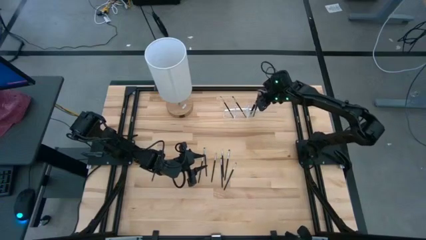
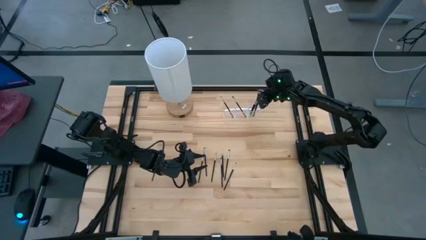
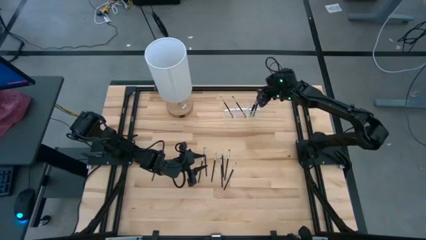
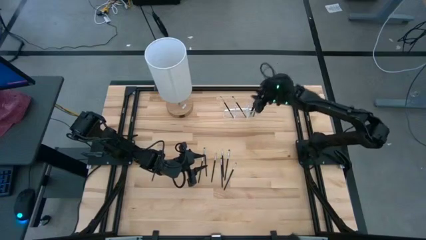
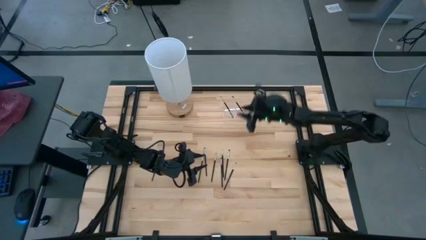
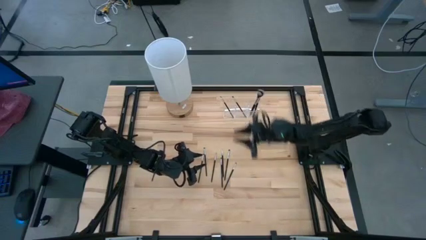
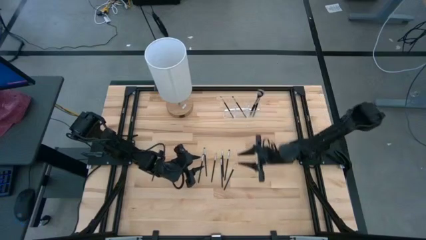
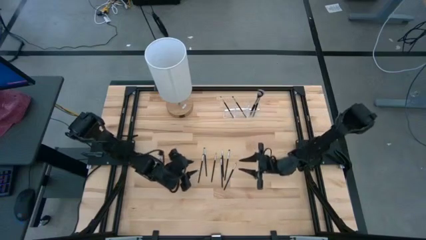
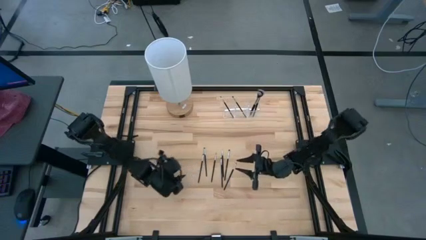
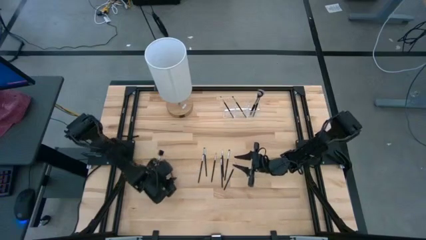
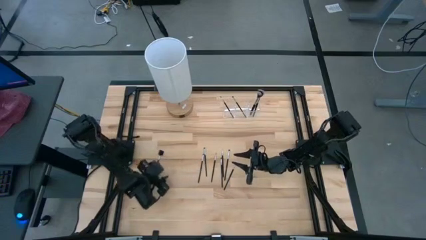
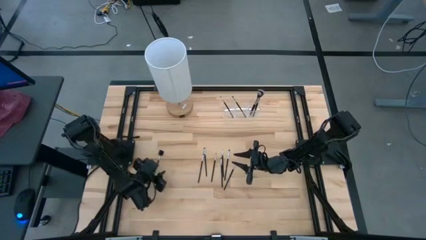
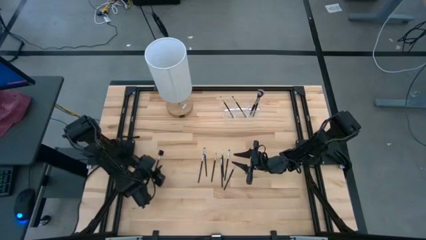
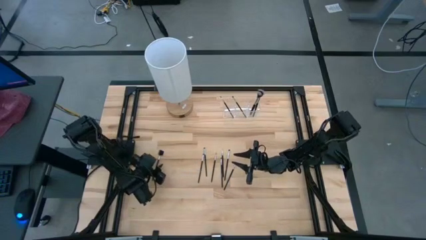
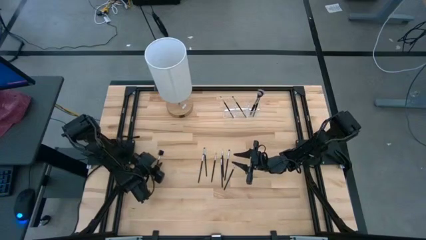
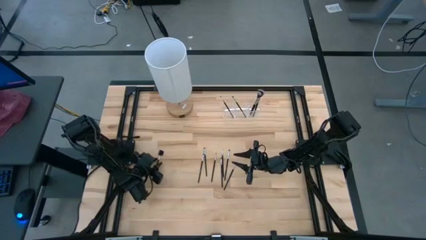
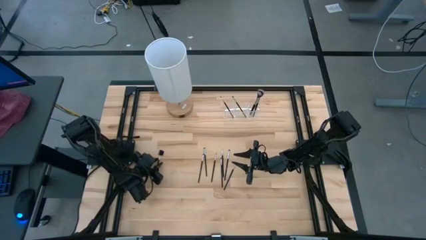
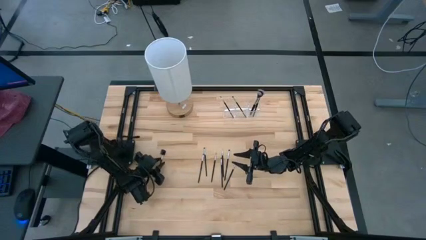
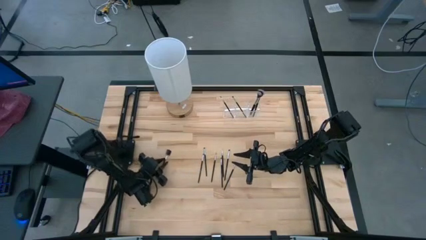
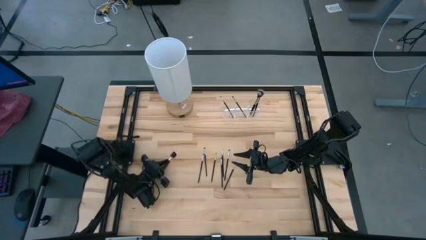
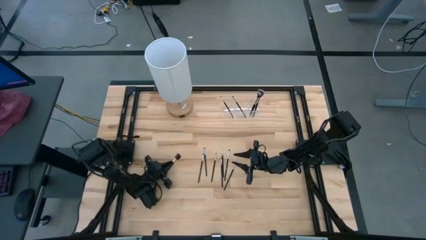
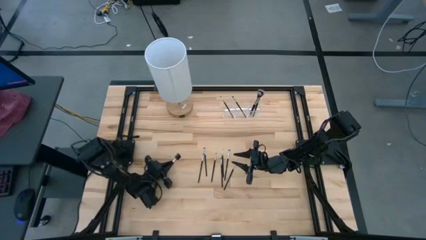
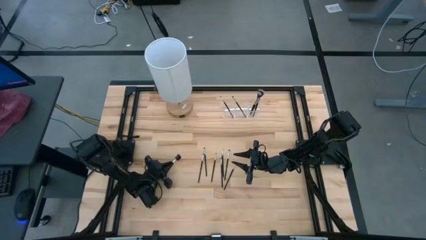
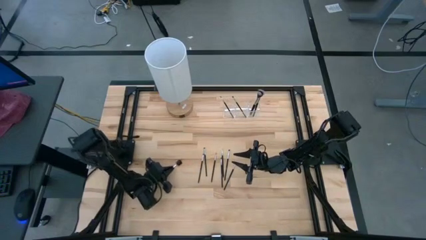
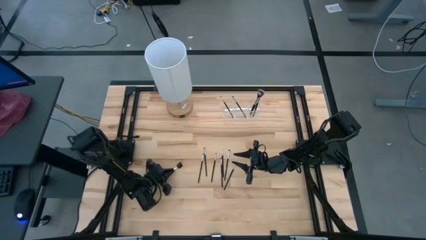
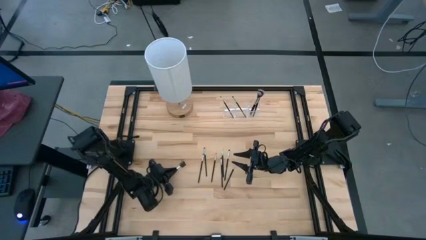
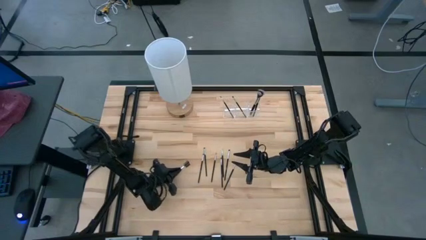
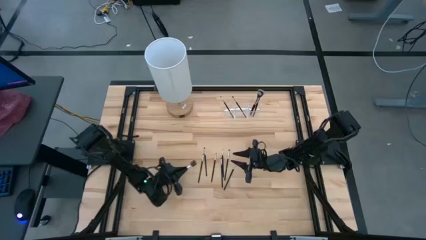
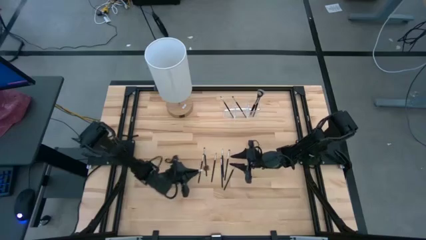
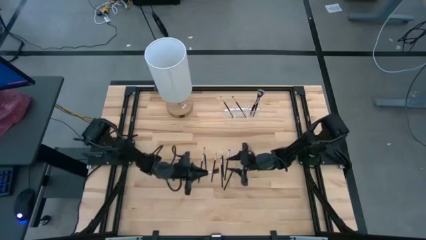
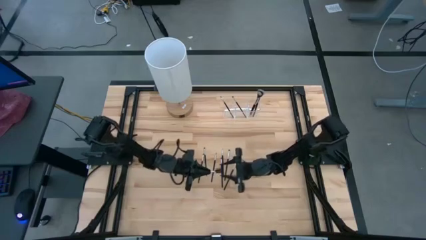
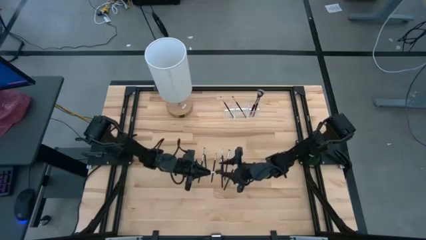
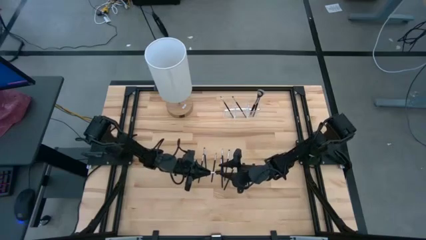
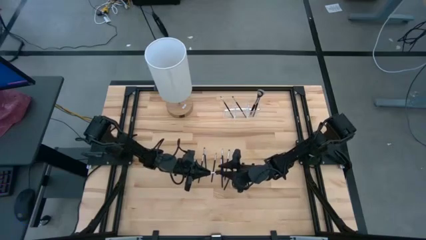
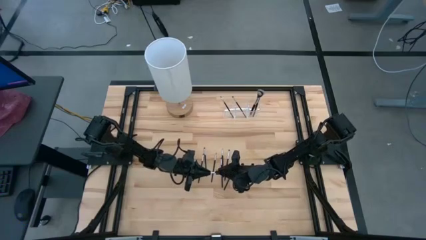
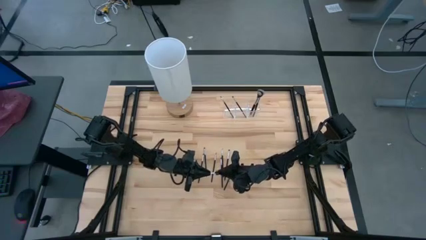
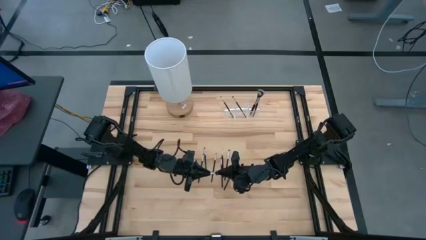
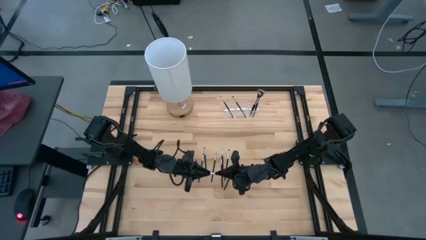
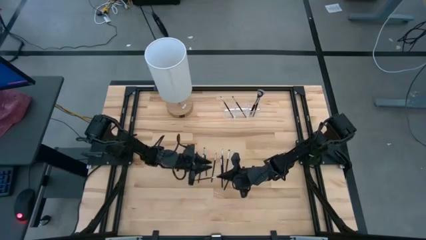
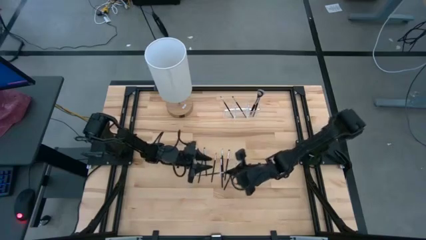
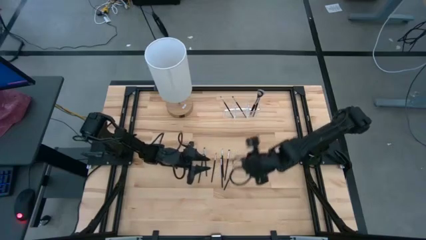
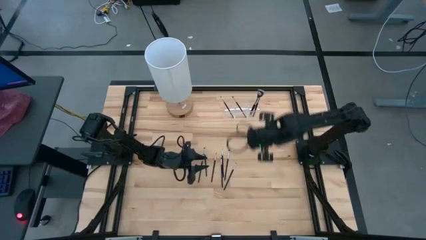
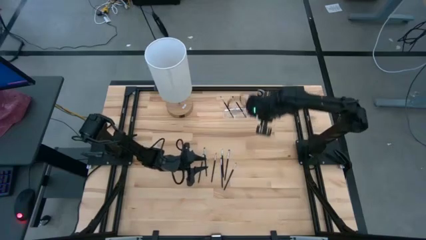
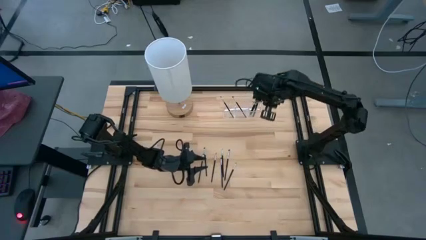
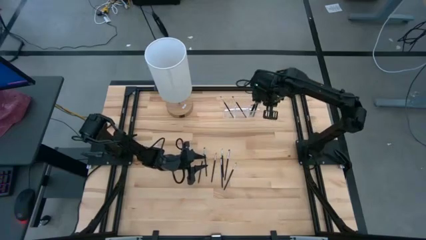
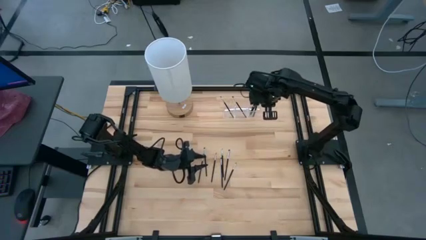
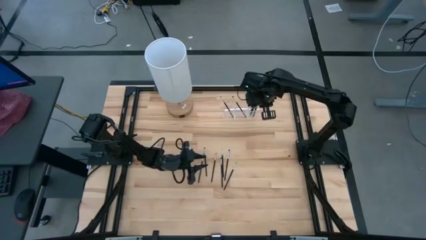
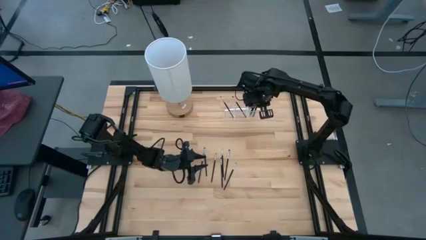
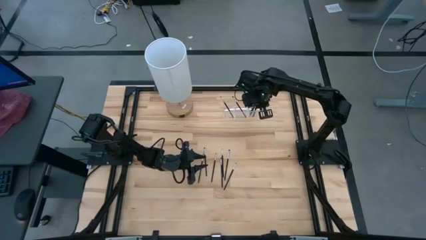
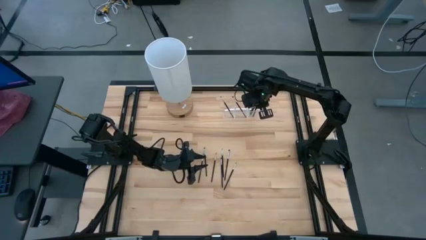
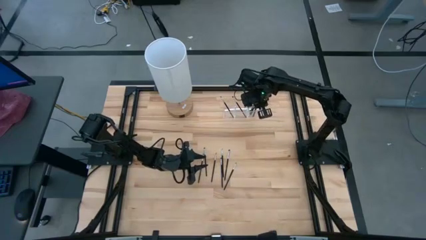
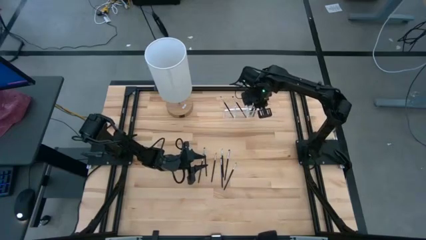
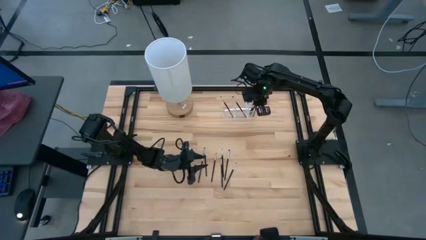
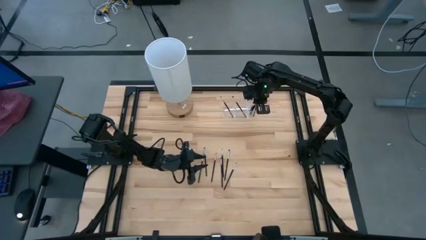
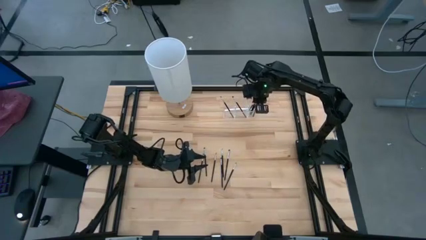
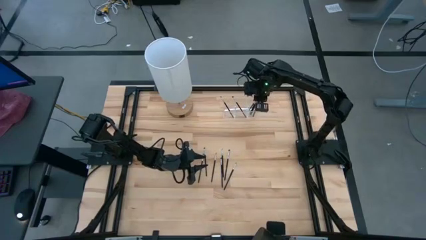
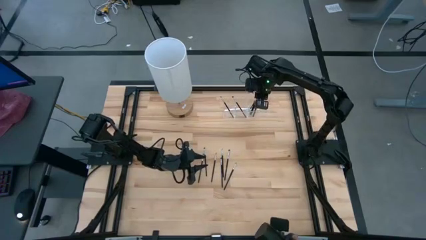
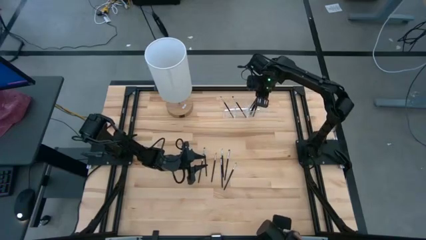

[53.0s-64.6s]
Task: Sort items
Put the brow brush into the transparent organizer

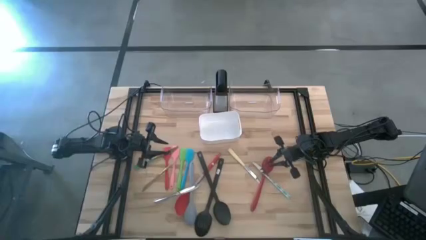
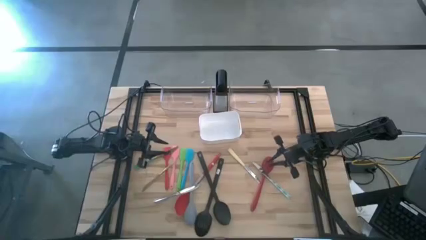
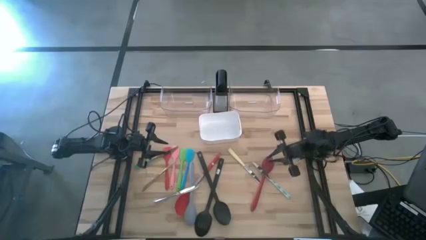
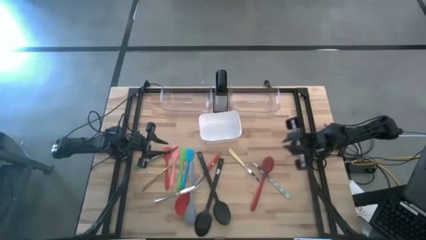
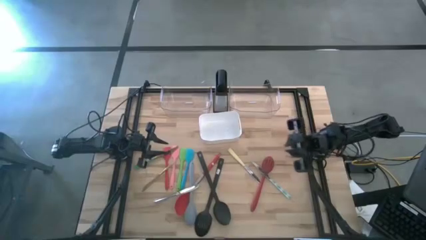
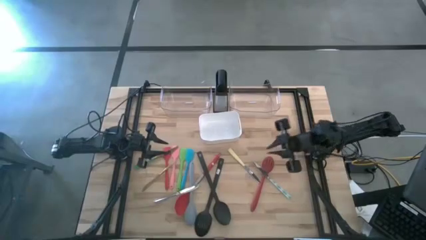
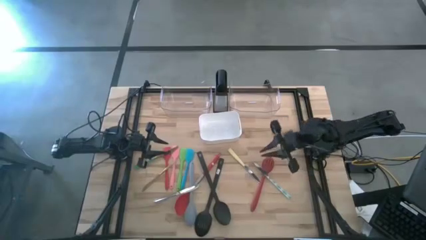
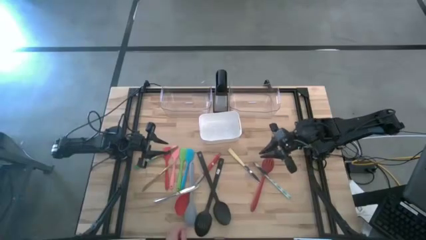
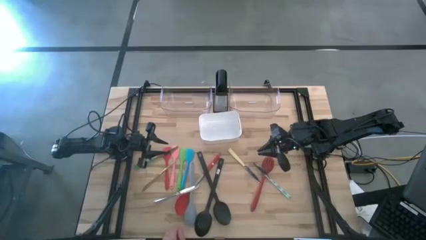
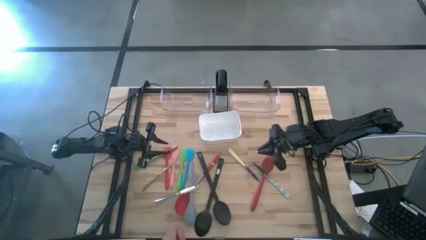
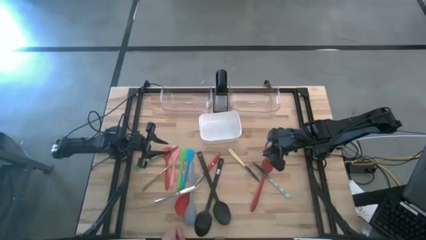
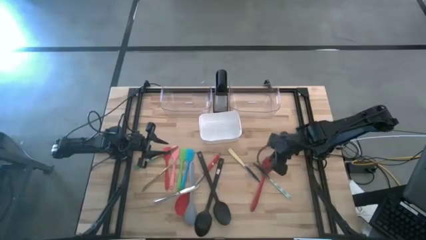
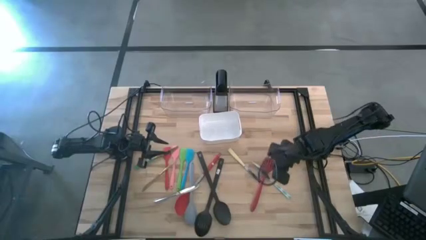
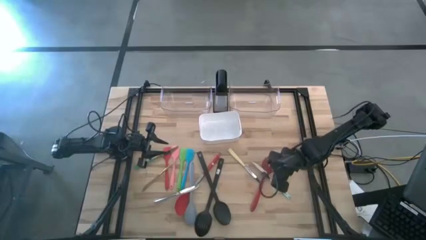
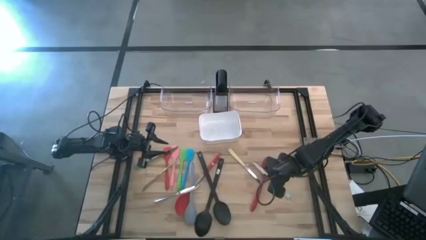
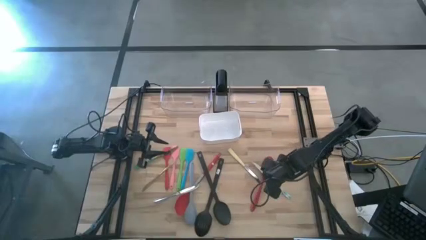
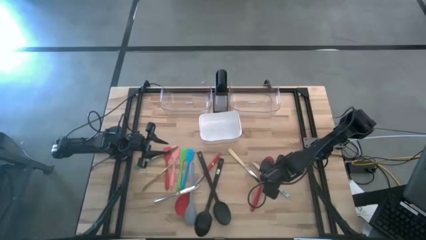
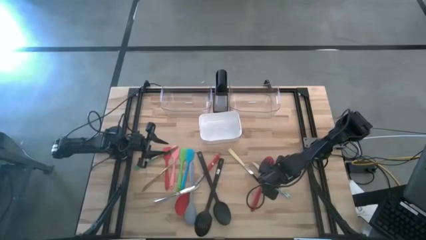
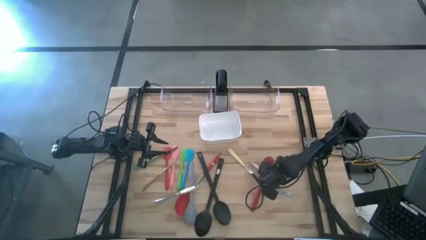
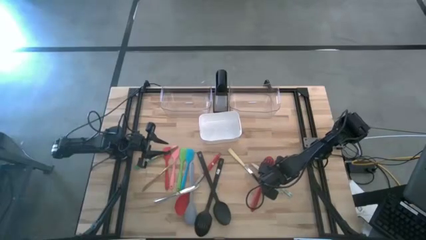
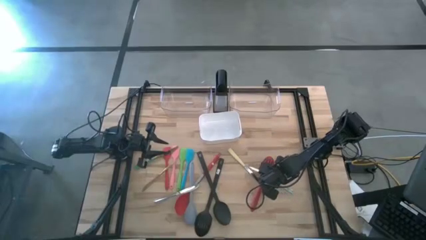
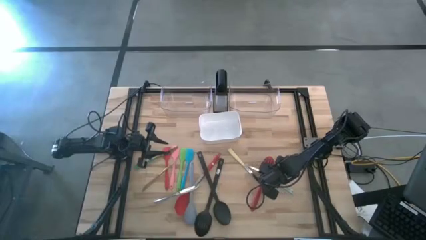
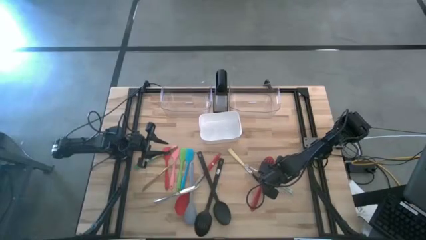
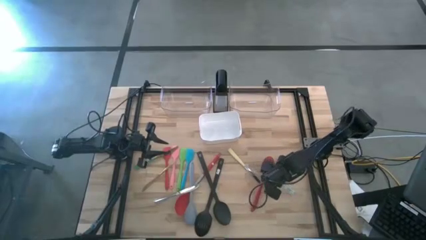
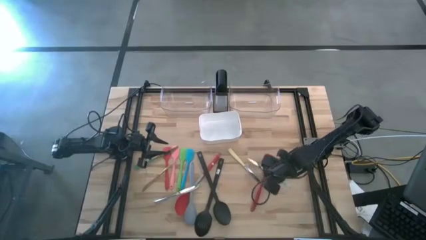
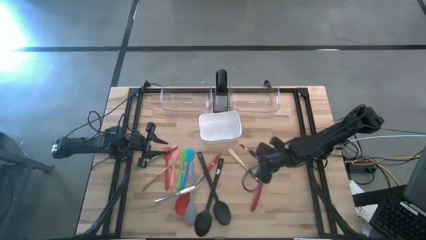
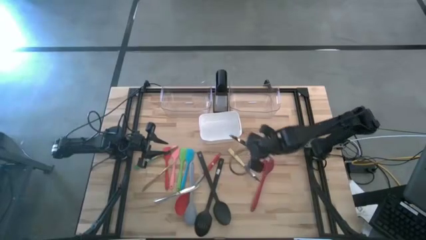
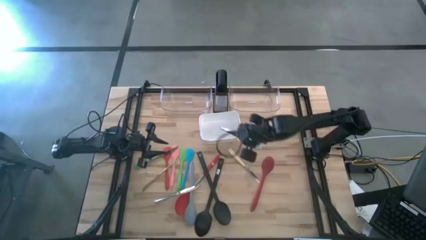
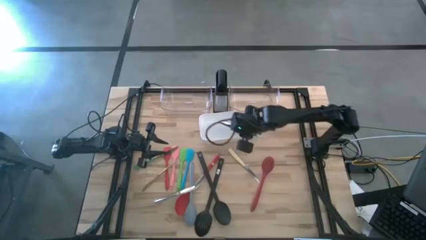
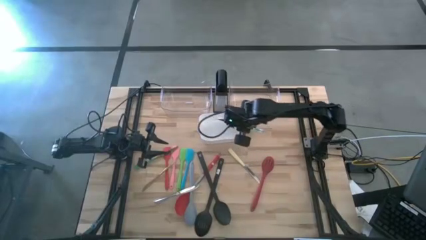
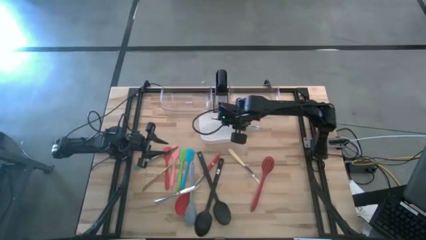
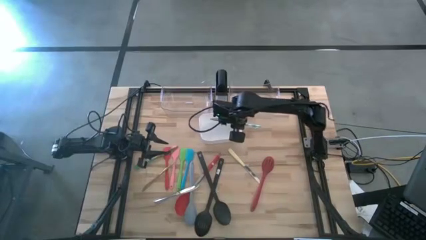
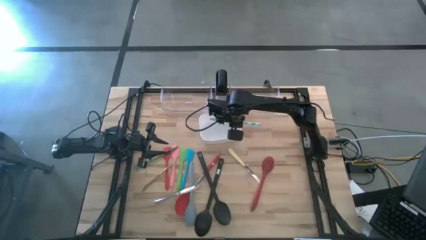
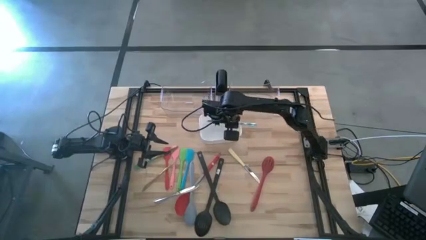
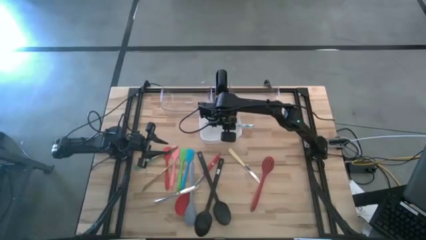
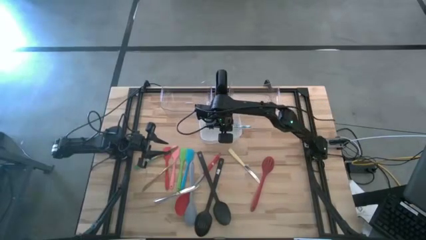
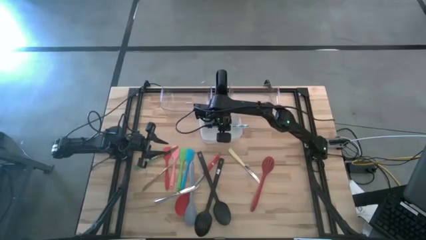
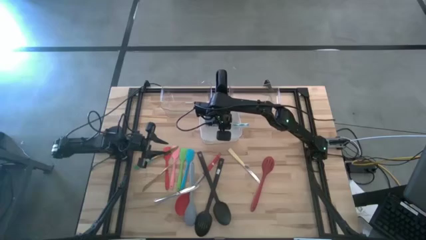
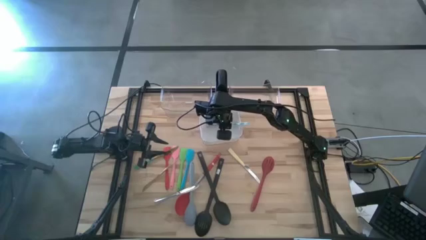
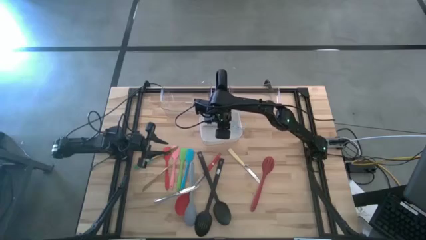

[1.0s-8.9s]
Task: Pick & Place Kitchen Items
Put the green patterned table knife into the white bin
